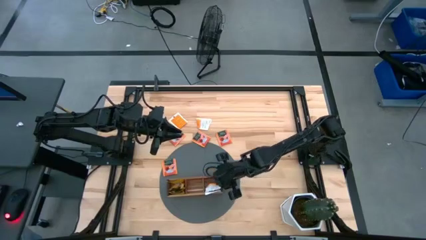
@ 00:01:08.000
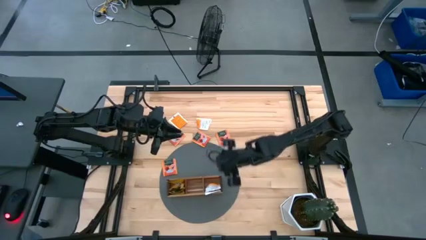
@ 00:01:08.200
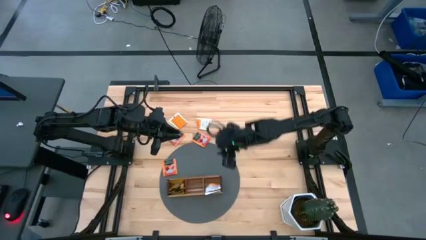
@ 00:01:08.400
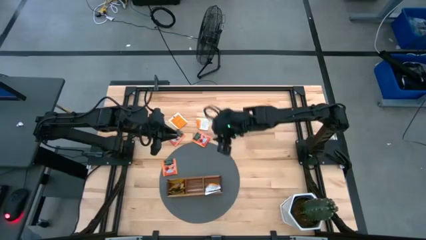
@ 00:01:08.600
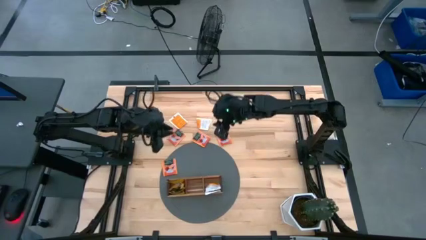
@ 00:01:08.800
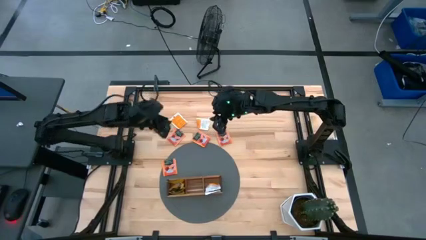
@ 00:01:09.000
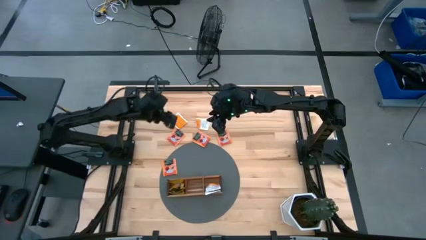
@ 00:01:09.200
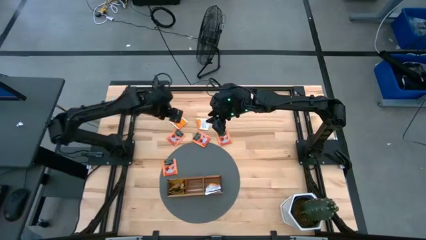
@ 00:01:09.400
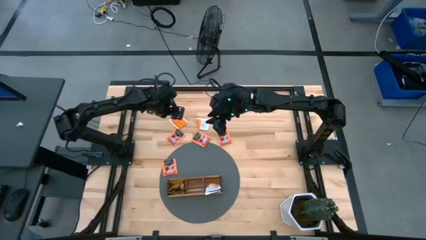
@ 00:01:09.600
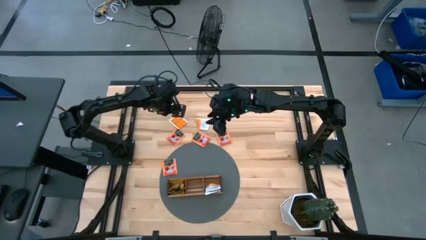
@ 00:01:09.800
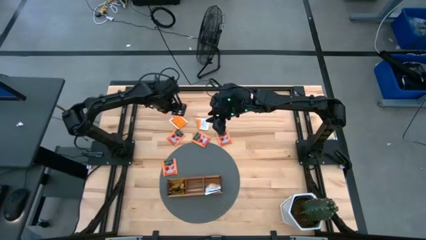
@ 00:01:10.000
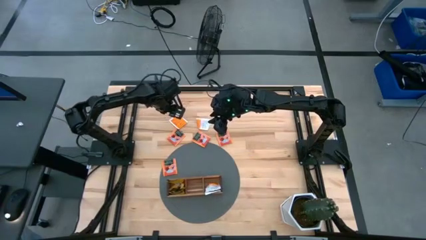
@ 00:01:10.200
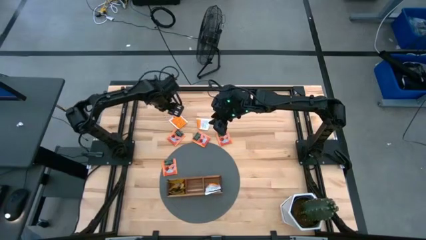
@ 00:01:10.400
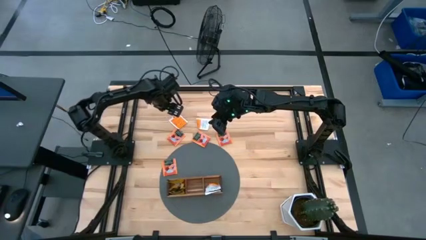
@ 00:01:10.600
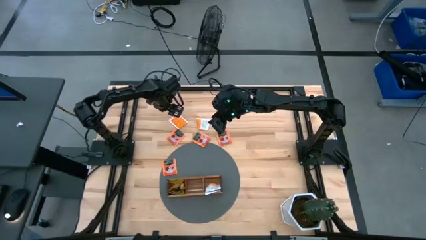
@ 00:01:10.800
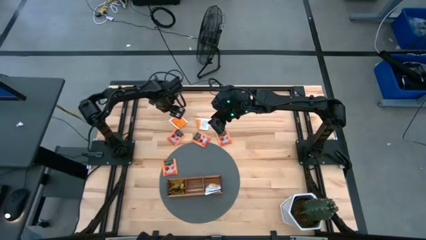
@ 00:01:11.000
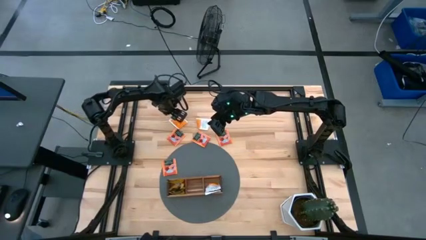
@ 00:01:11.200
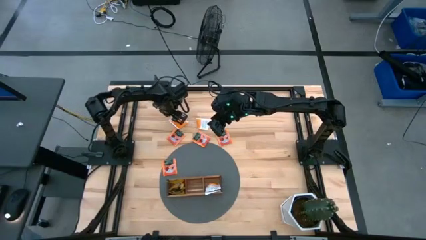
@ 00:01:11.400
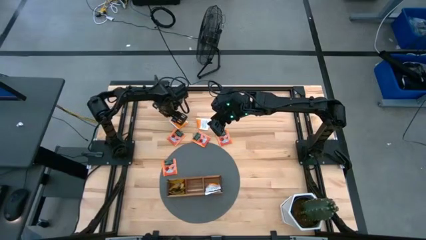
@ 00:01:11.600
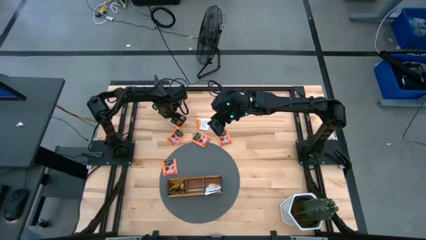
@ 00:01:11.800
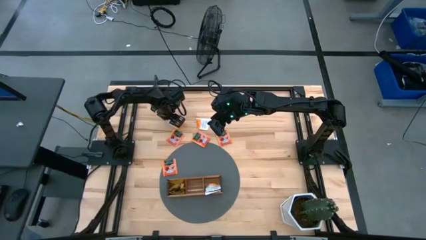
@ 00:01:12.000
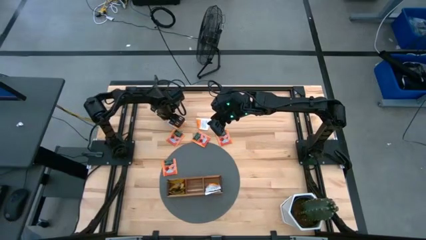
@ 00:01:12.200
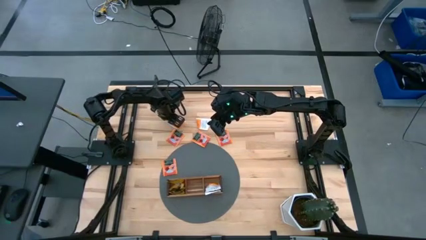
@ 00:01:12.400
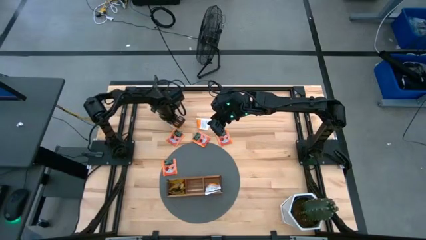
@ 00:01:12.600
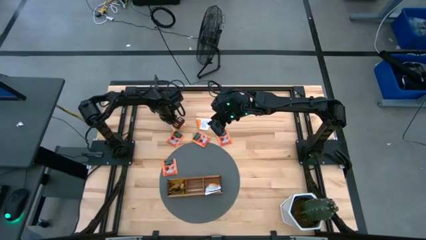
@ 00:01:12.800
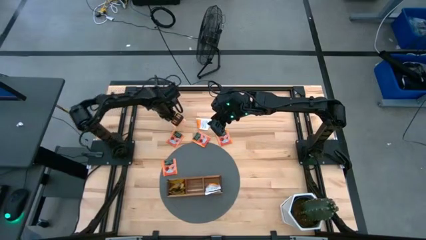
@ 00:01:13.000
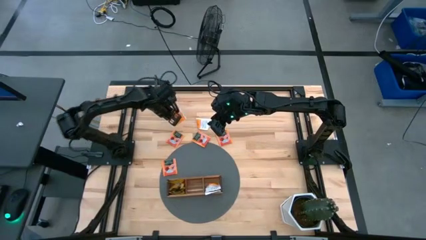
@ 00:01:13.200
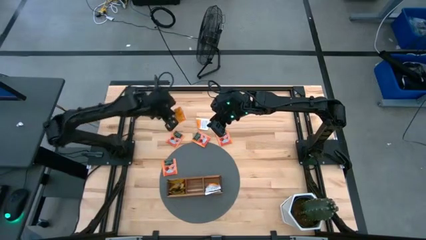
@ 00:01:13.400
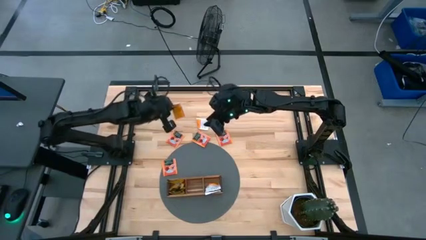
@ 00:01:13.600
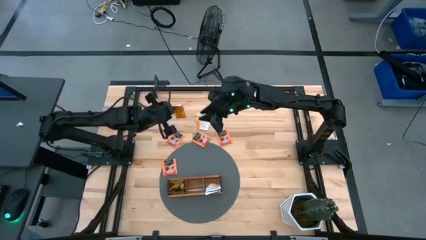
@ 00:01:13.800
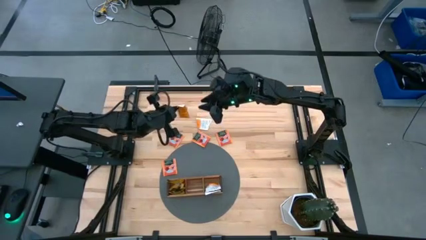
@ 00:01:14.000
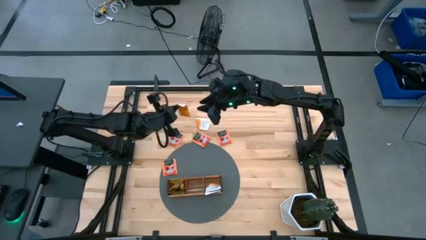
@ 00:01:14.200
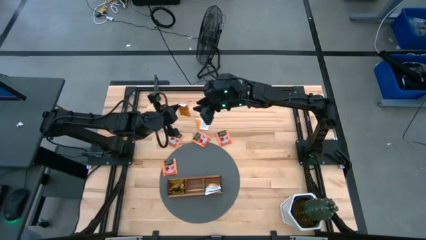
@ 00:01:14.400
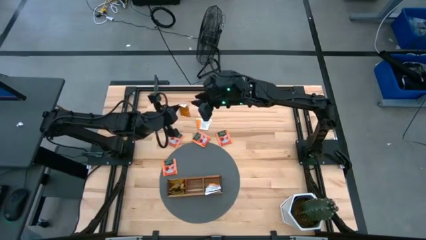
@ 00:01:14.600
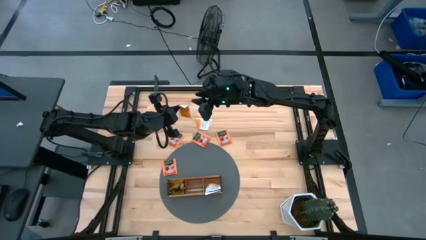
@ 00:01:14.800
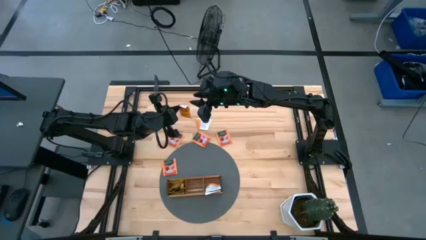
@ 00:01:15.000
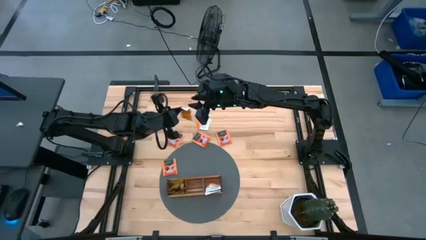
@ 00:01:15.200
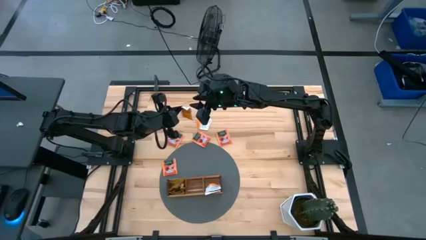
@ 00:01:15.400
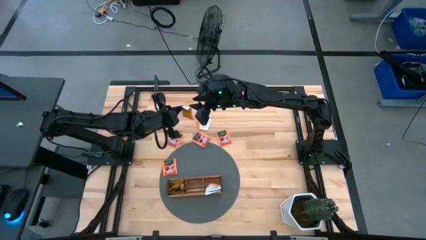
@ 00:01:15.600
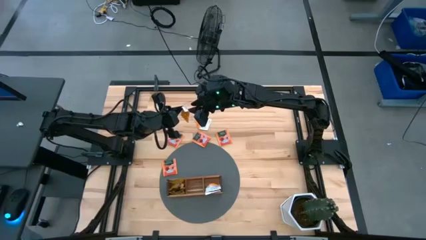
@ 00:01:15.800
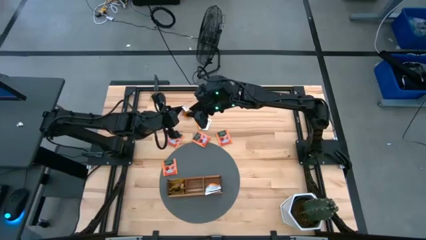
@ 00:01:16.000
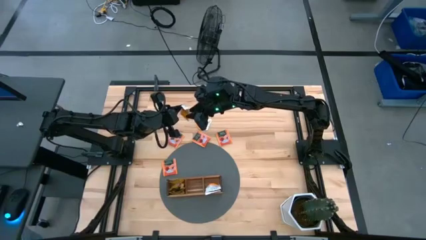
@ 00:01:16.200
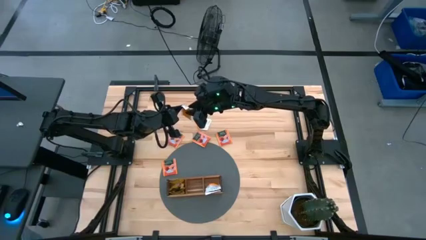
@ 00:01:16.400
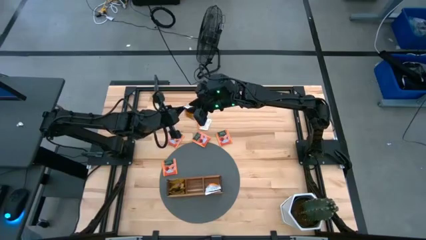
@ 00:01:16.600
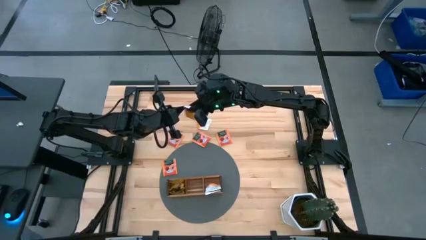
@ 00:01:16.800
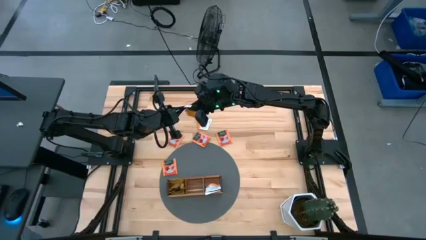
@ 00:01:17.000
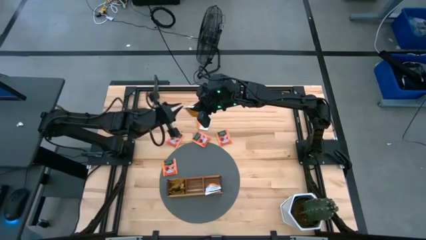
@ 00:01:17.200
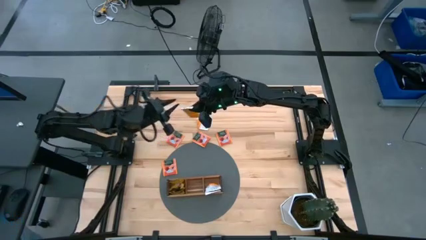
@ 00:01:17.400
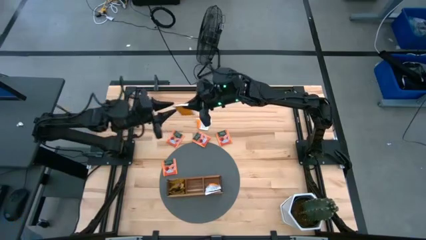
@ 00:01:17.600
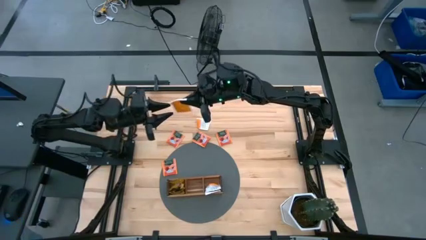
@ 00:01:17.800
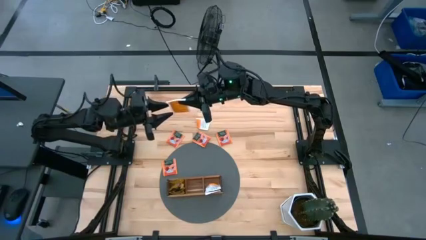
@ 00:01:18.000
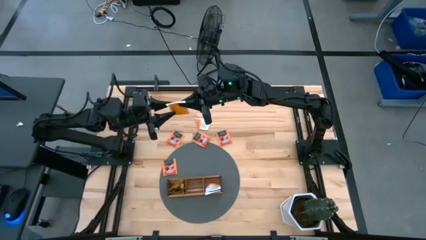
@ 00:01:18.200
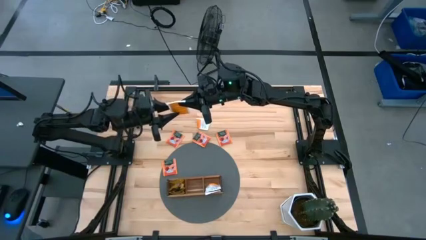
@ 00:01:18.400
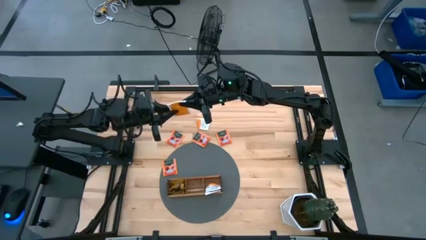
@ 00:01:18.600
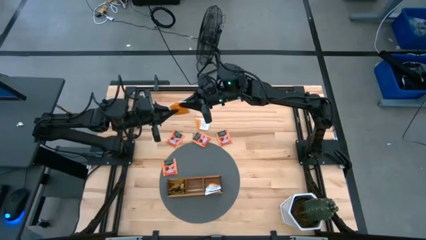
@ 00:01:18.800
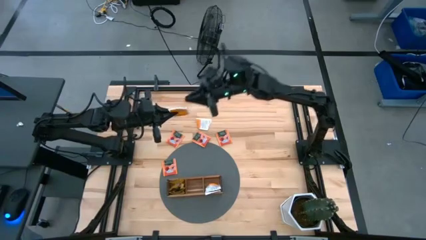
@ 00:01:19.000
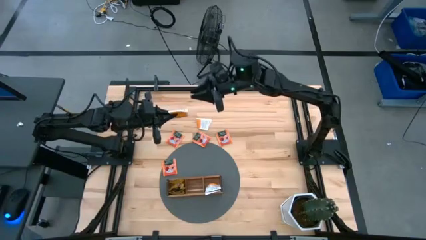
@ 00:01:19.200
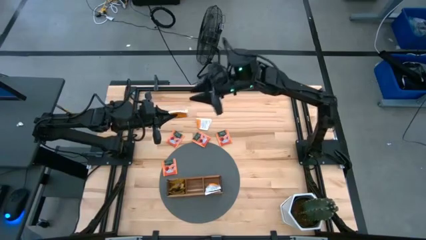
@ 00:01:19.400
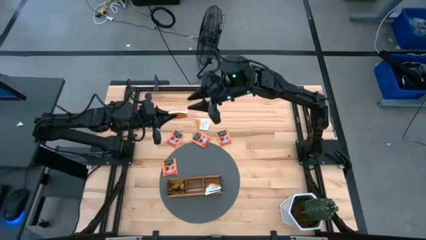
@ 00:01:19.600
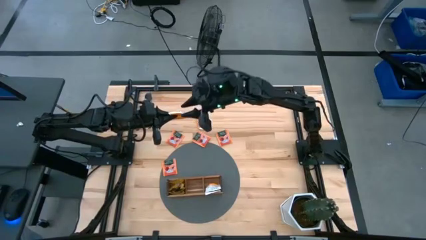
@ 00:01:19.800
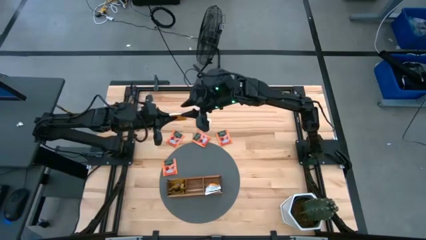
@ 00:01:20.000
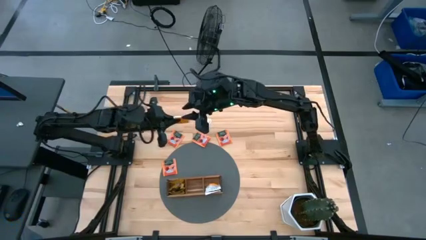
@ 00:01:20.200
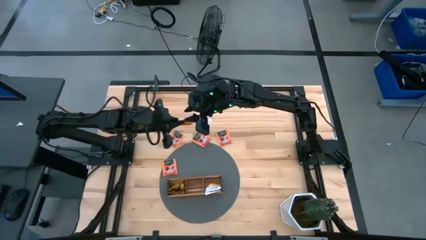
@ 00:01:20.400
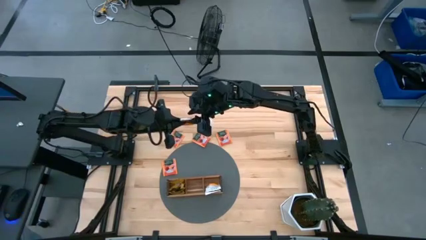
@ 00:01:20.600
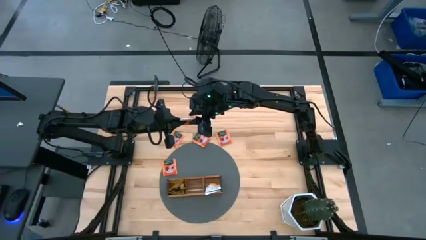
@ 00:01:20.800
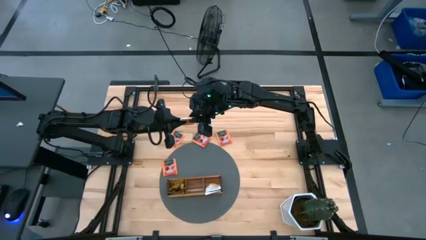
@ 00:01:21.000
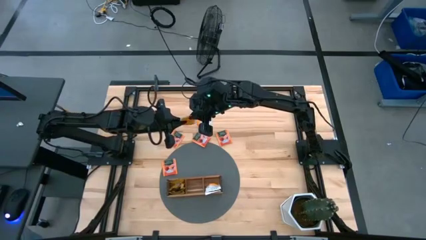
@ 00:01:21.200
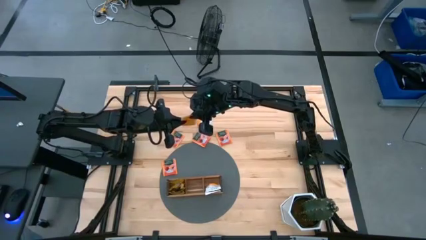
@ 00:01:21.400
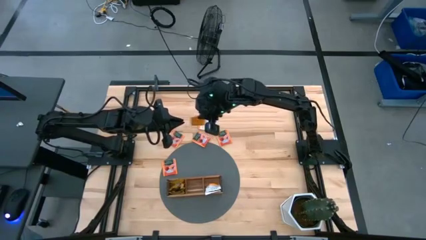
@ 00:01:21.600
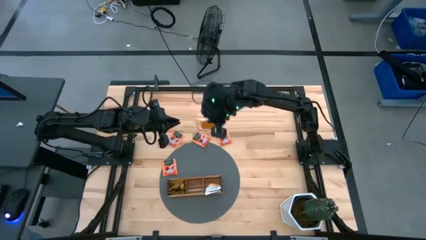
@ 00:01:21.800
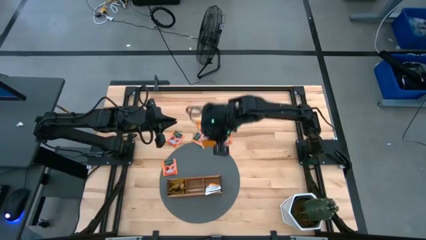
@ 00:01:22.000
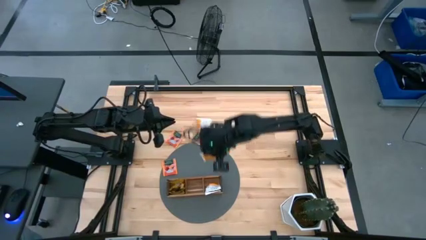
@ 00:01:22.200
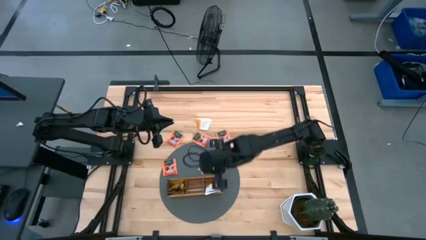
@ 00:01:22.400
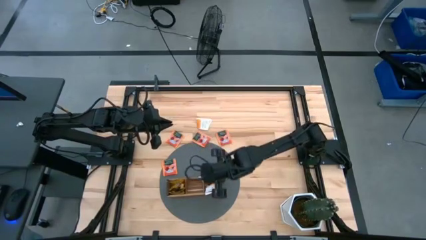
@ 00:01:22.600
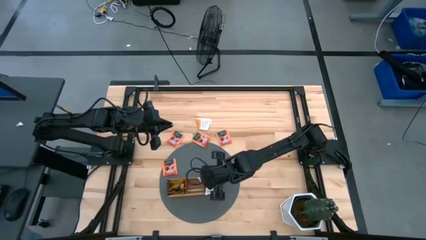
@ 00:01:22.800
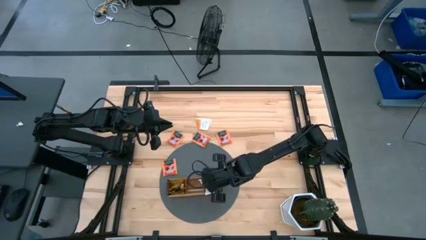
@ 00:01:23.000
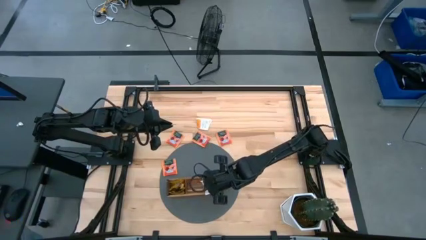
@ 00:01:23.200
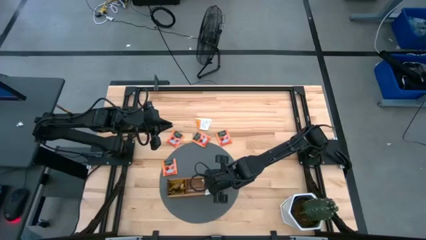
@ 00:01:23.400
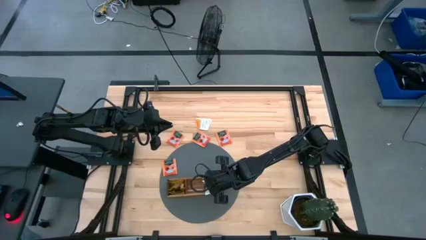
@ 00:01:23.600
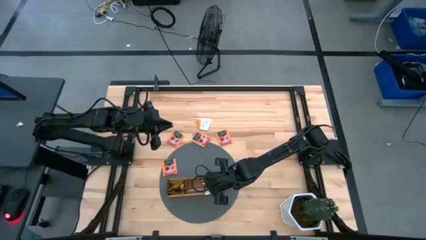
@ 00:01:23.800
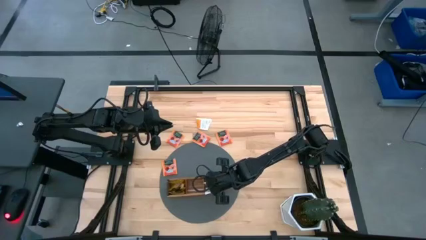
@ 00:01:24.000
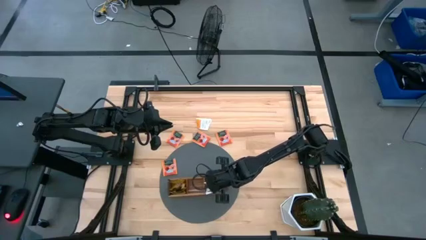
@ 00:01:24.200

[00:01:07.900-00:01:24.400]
Task: Pick & Place Tea
Put the orange white tea bag into the right section of the wooden organizer
